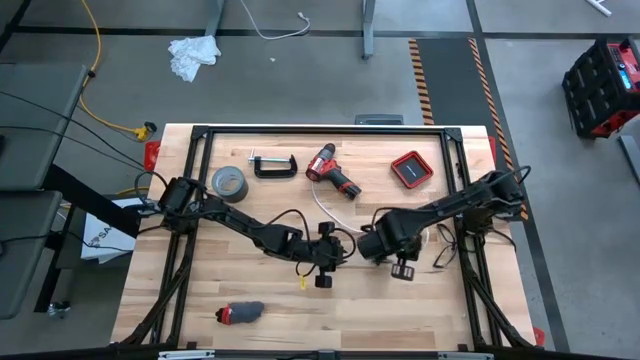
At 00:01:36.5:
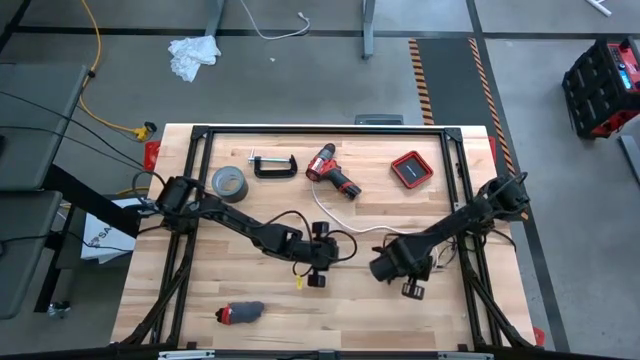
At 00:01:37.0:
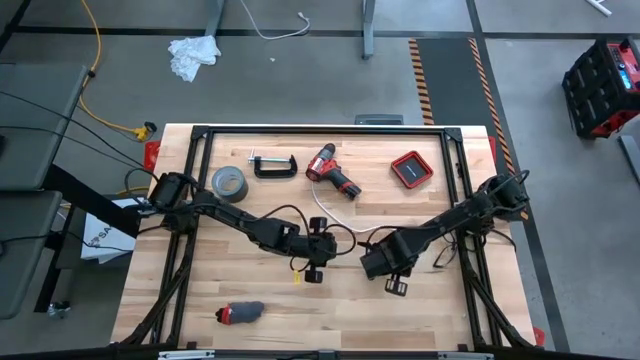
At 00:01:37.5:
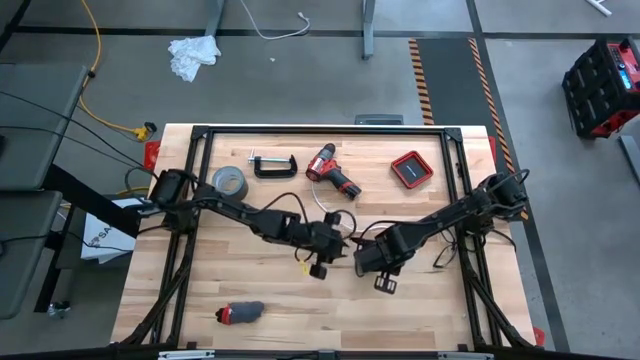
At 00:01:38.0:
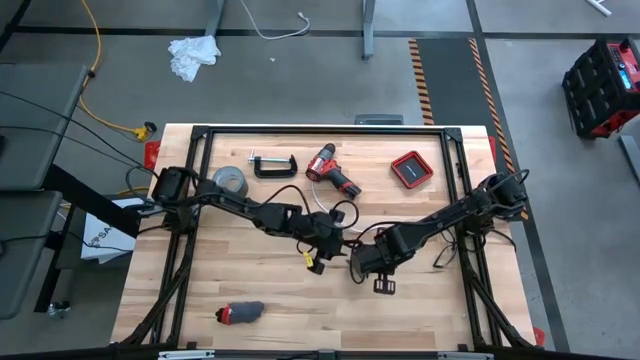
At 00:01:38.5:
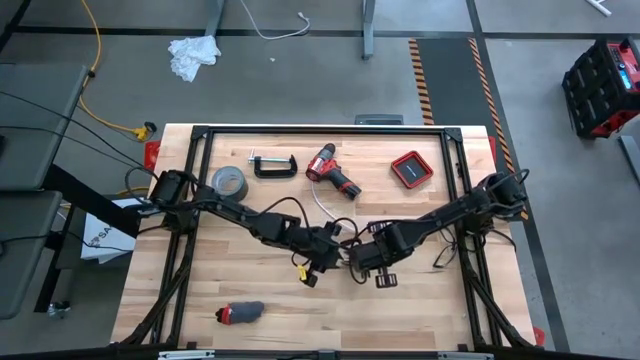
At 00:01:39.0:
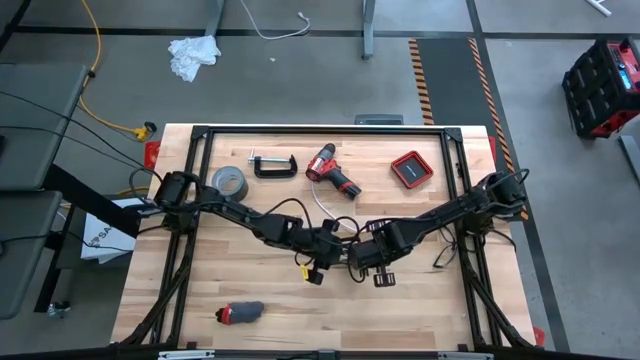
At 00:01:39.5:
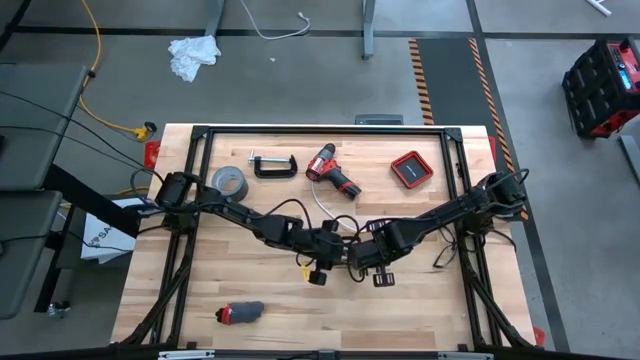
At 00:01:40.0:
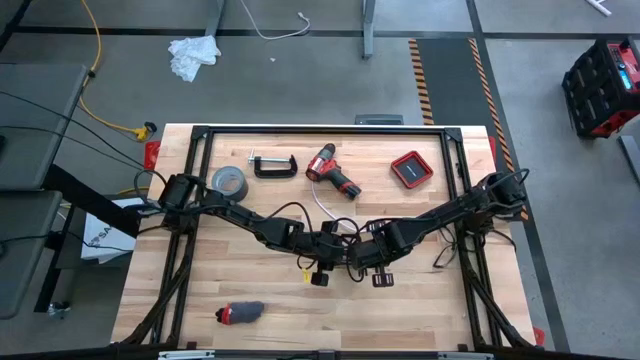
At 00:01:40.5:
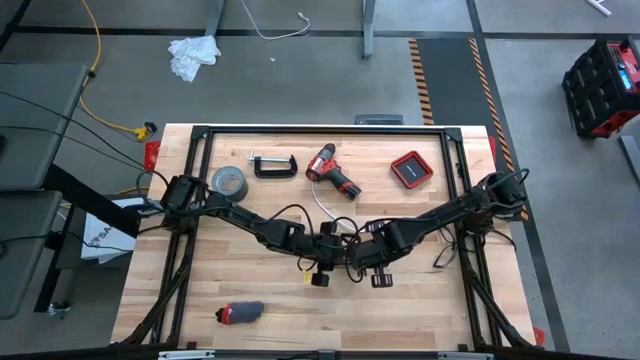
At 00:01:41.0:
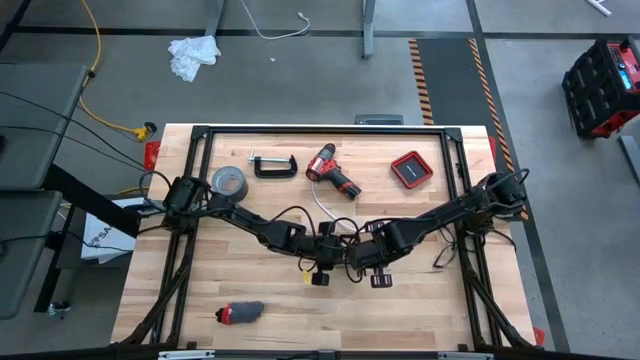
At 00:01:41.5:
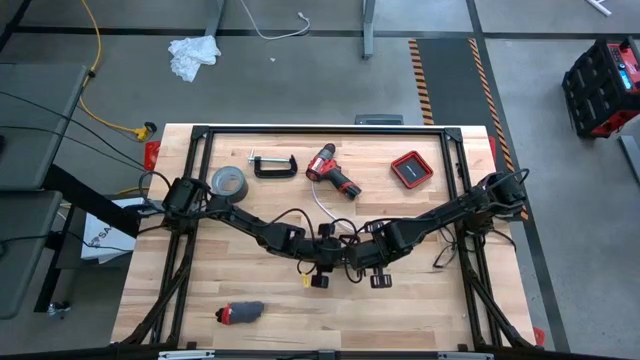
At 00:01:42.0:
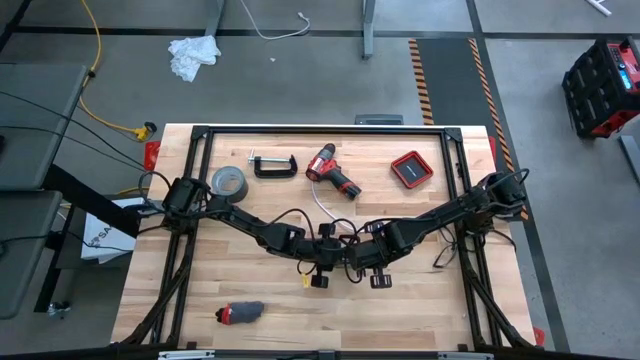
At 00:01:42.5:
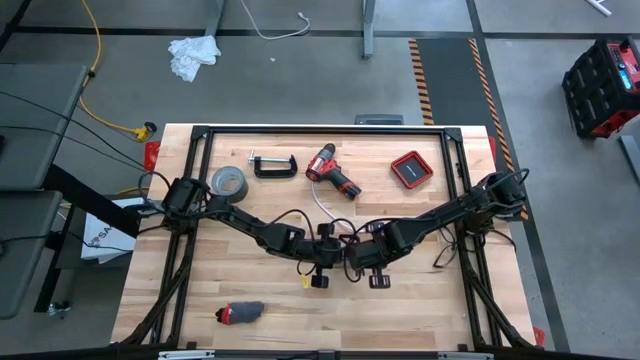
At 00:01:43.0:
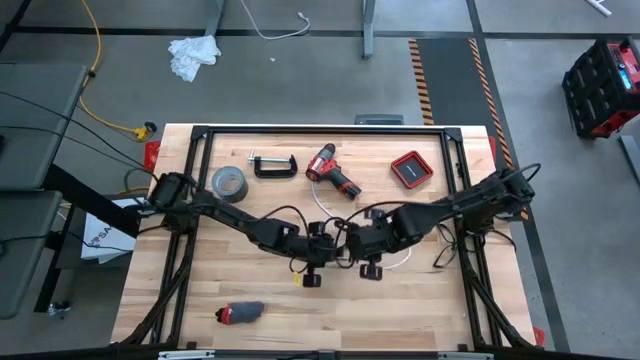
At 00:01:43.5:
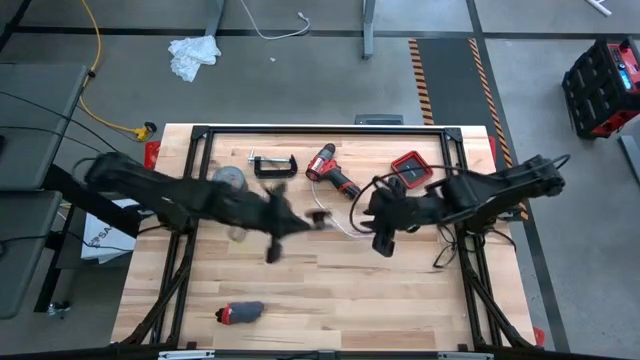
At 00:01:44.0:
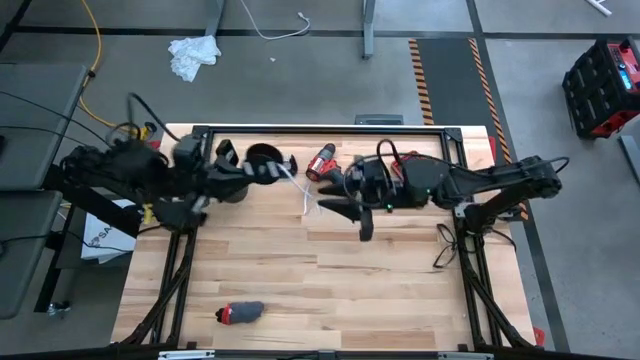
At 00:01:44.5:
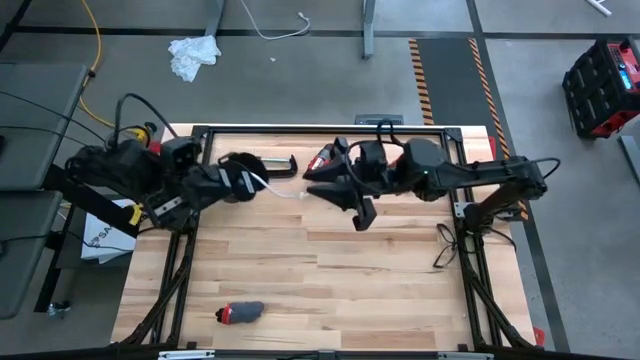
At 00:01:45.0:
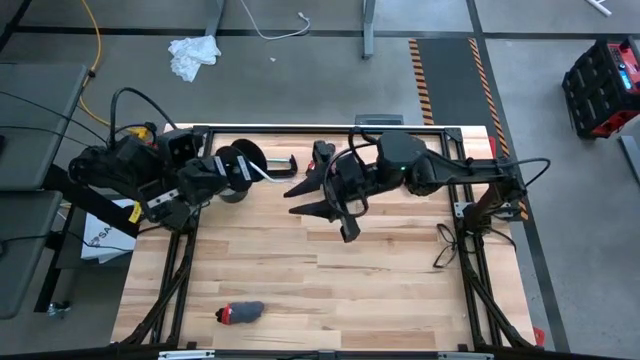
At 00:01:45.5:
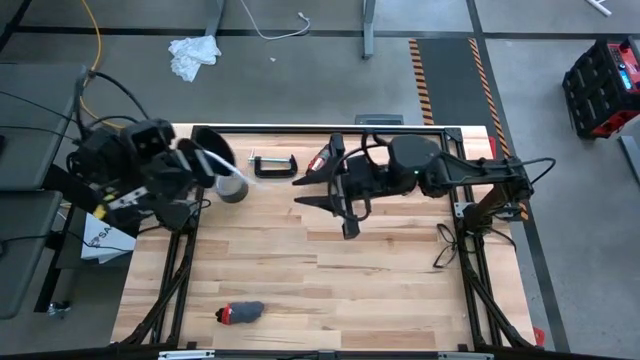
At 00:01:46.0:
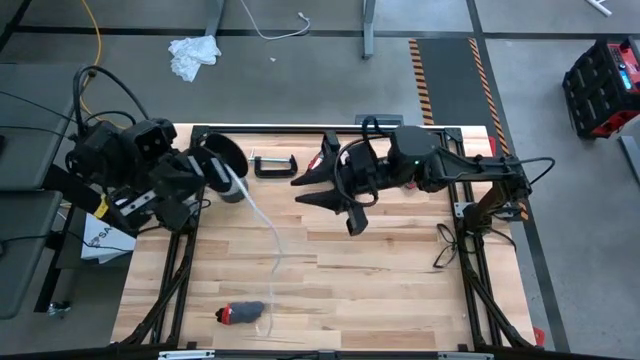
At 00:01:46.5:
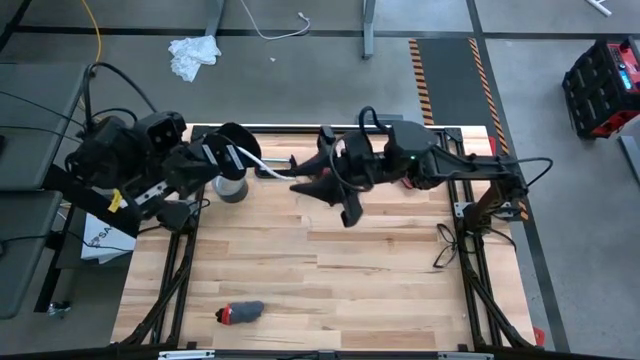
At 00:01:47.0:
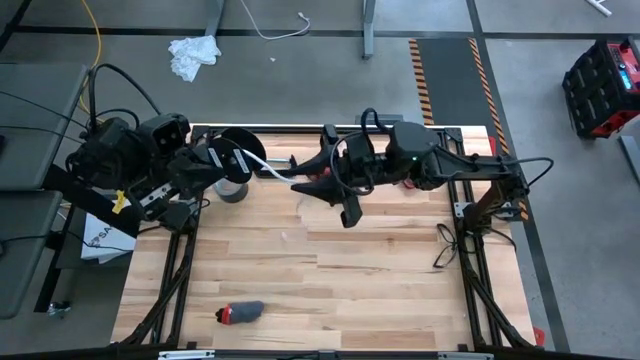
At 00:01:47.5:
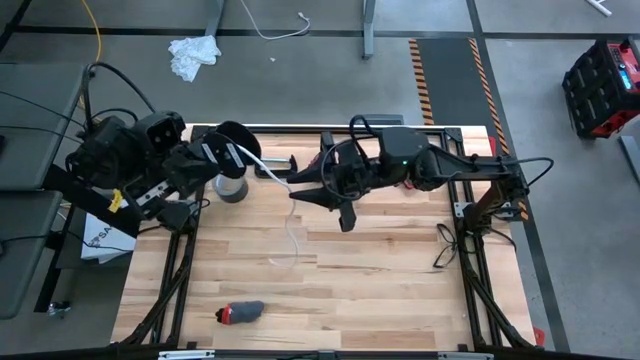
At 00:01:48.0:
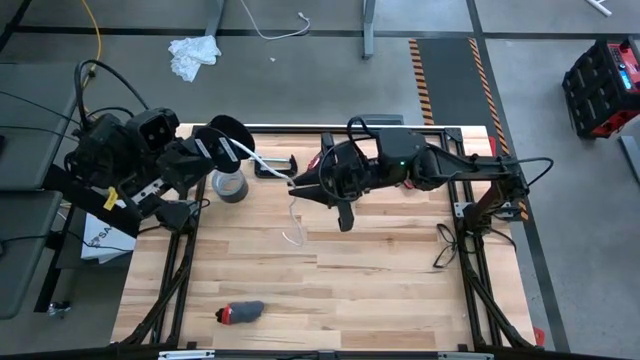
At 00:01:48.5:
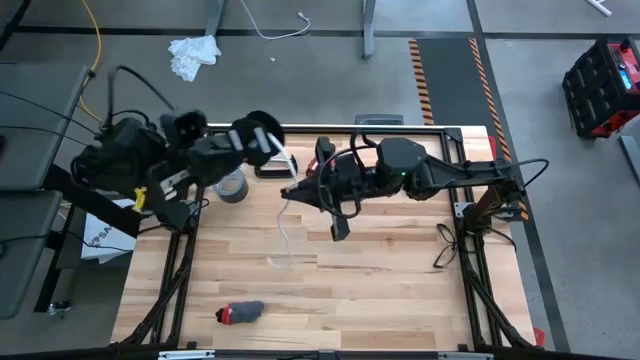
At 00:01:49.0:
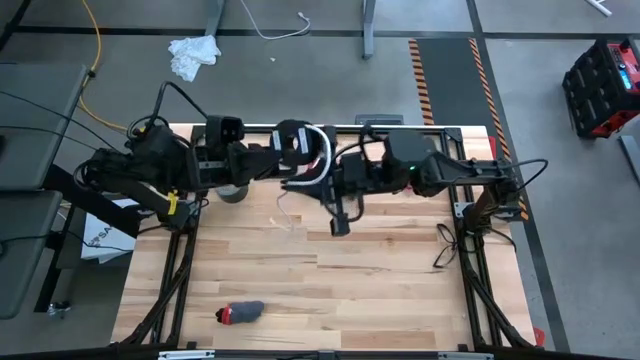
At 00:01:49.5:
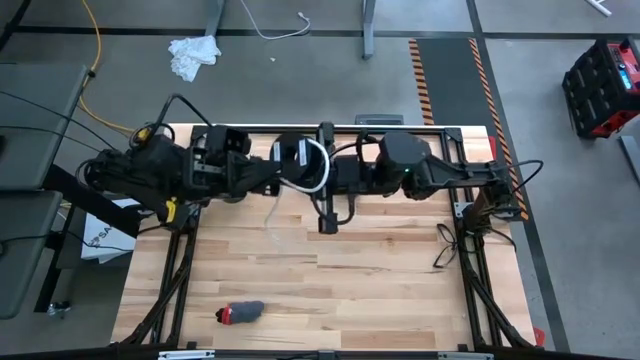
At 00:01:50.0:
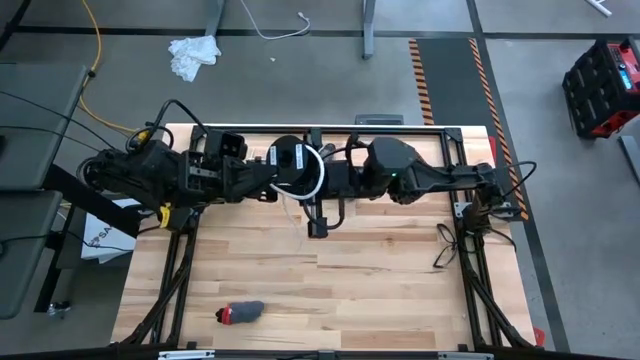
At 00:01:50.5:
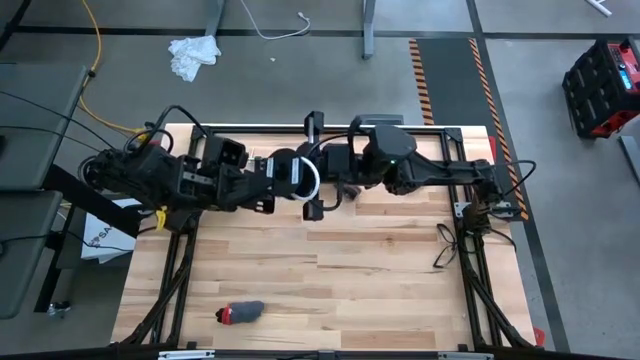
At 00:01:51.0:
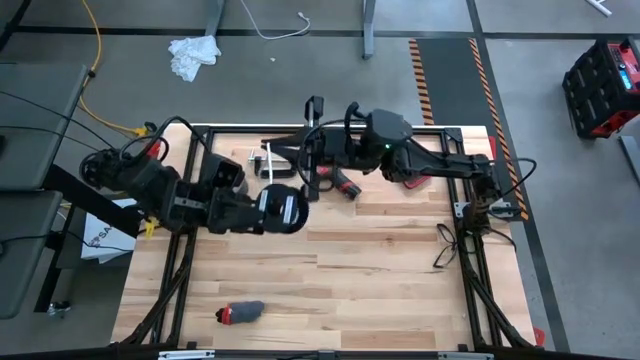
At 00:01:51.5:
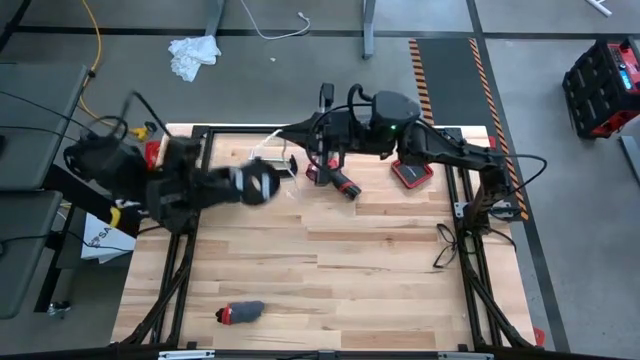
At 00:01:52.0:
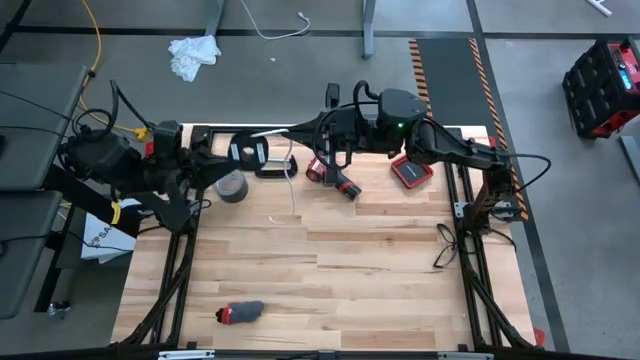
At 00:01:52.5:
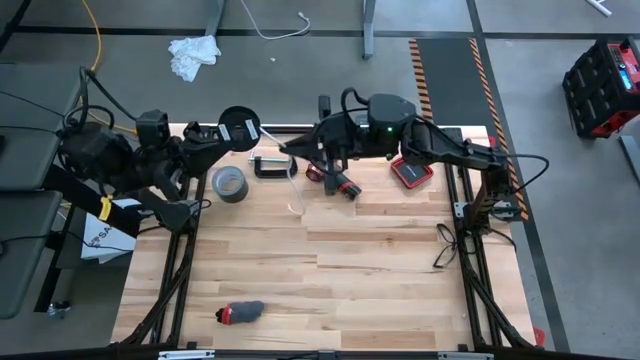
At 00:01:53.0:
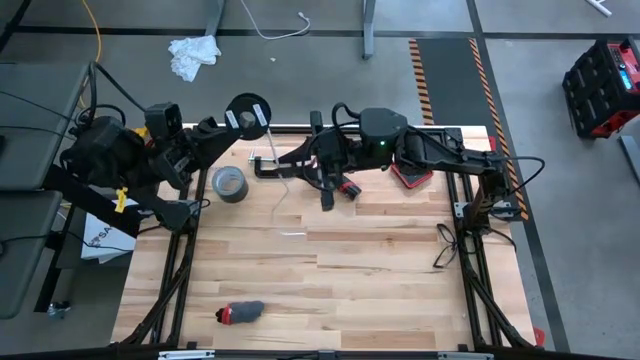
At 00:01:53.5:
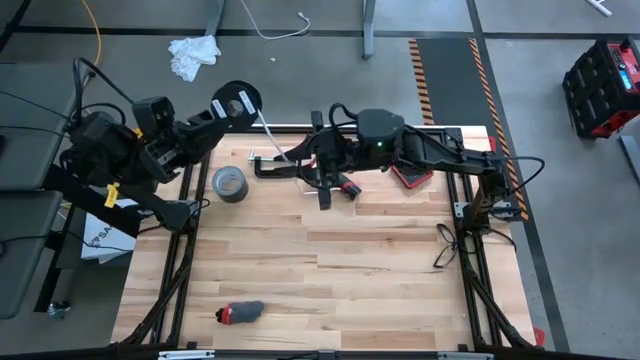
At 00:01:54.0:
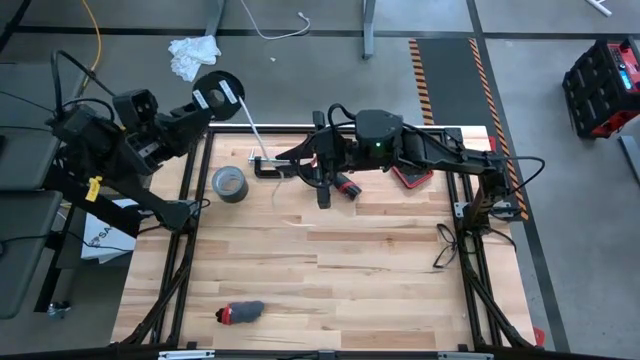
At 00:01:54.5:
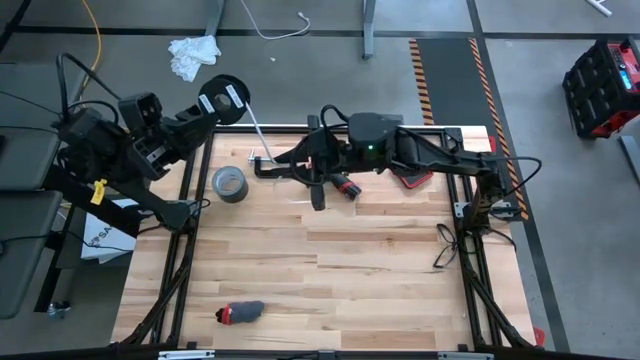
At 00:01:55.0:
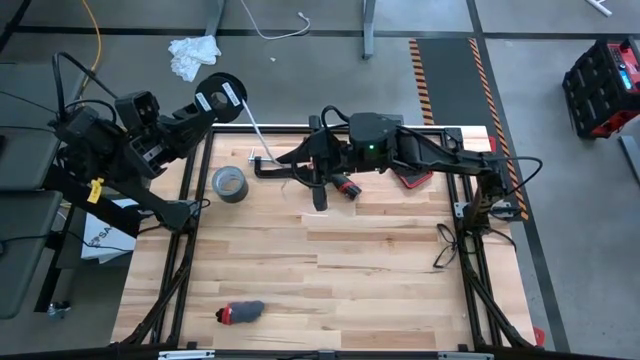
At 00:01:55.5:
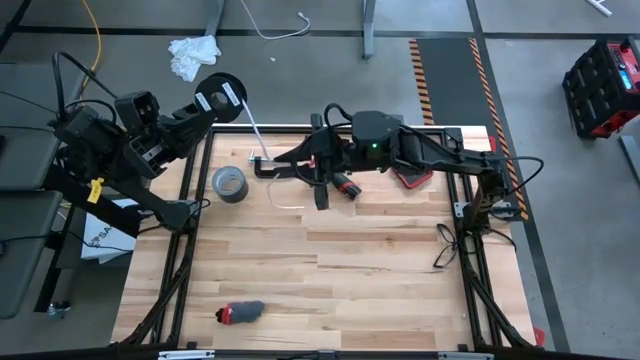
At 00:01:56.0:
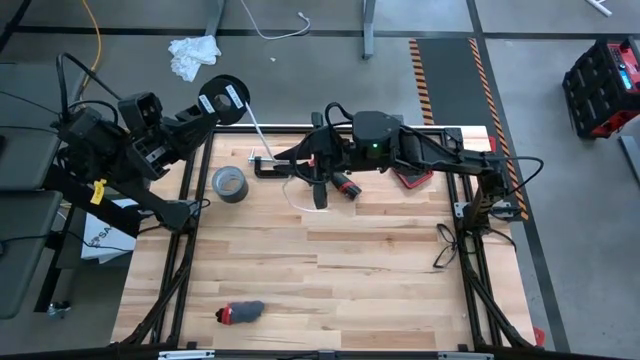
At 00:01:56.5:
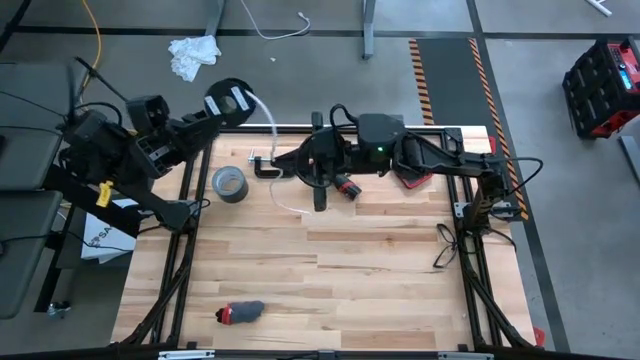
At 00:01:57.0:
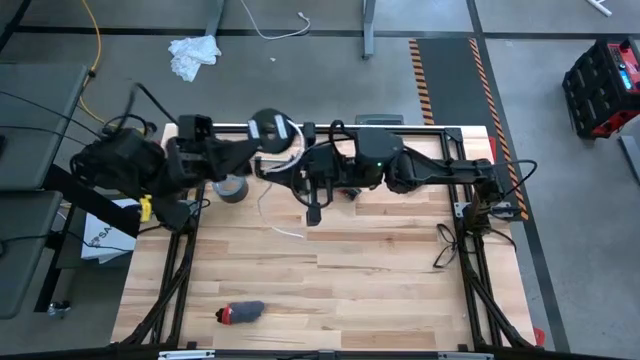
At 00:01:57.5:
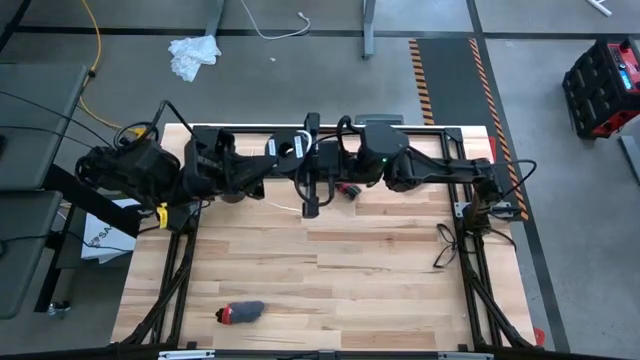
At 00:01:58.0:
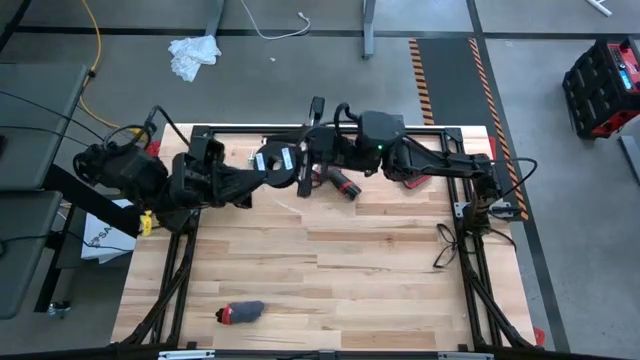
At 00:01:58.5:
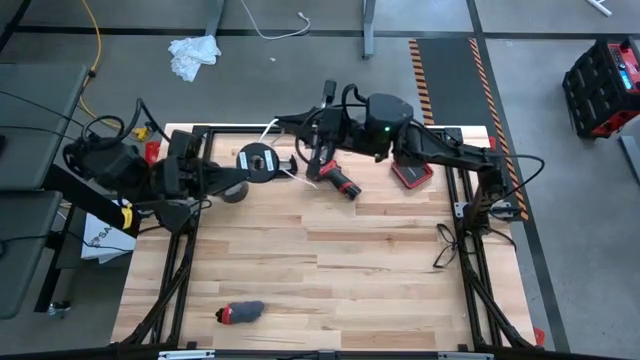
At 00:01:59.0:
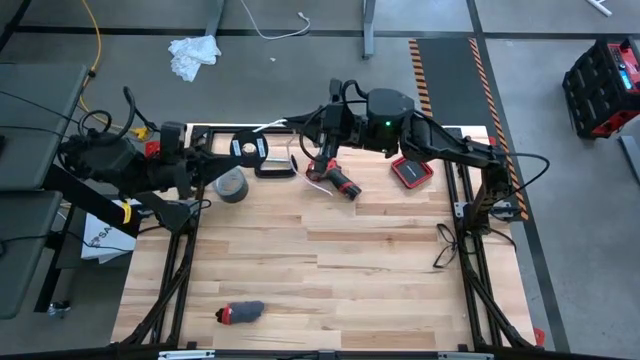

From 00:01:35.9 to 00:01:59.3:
Task: Coil cords
Coil the white cable wire into the black spool
